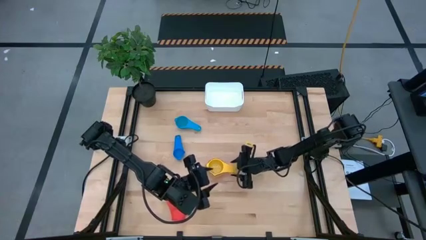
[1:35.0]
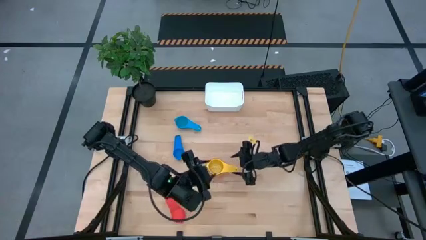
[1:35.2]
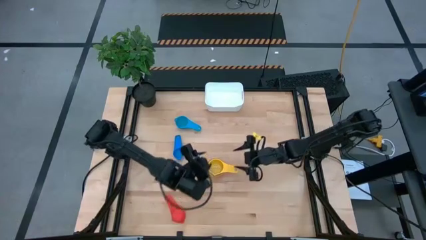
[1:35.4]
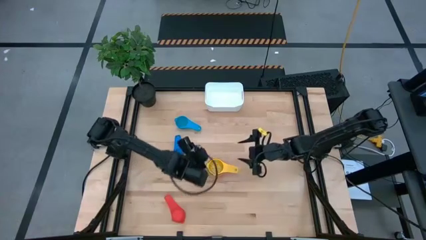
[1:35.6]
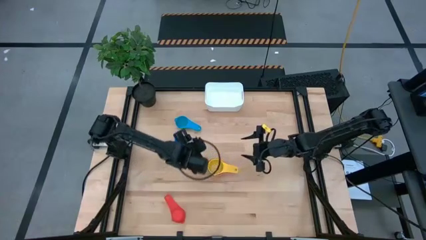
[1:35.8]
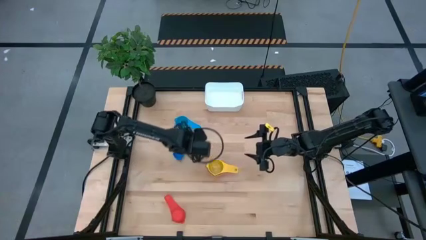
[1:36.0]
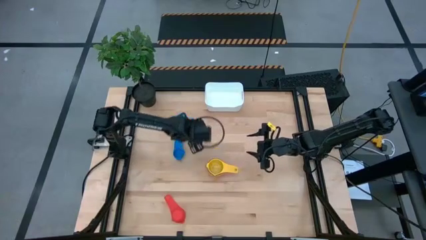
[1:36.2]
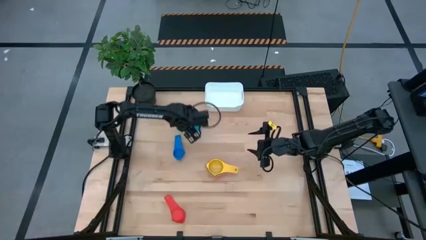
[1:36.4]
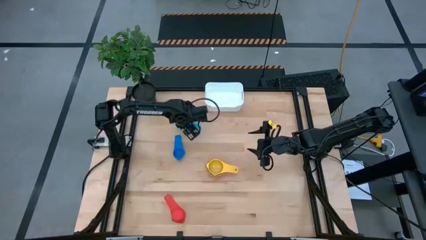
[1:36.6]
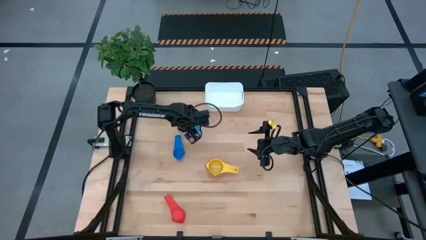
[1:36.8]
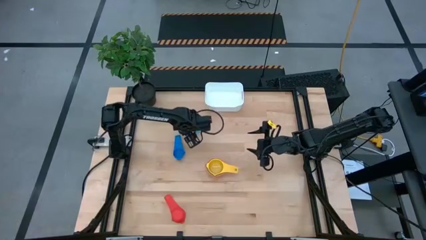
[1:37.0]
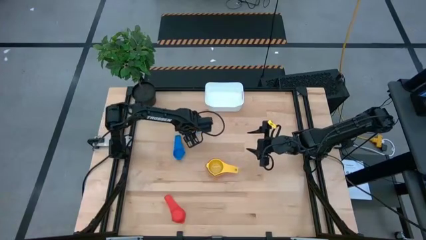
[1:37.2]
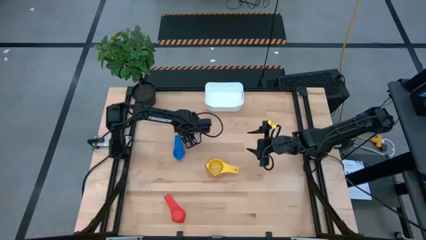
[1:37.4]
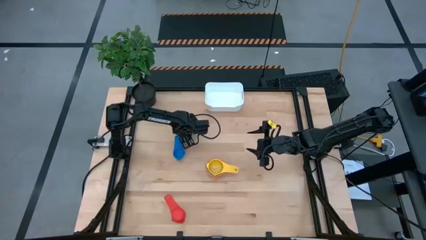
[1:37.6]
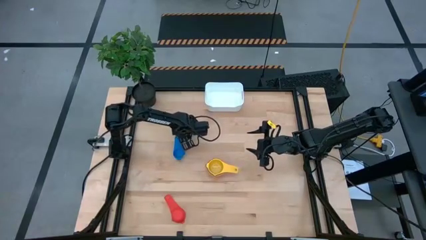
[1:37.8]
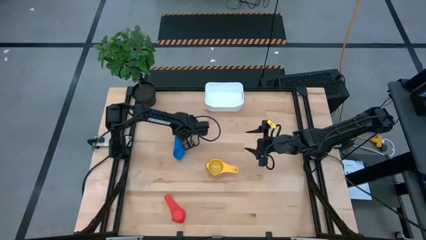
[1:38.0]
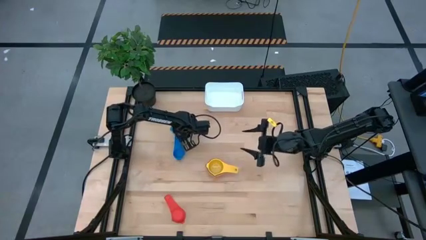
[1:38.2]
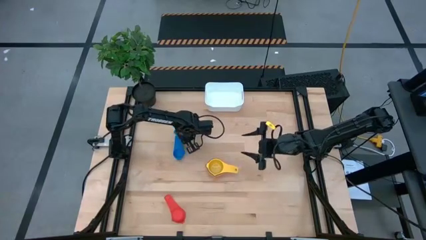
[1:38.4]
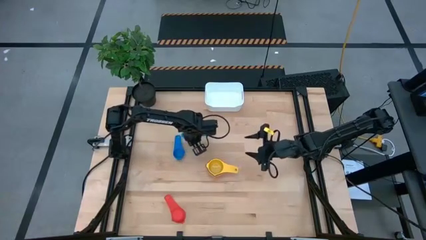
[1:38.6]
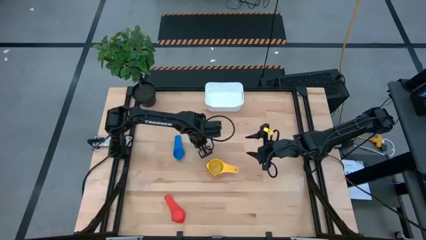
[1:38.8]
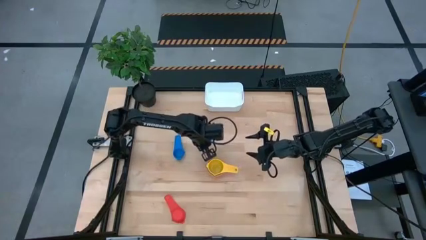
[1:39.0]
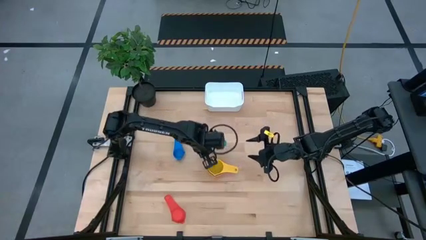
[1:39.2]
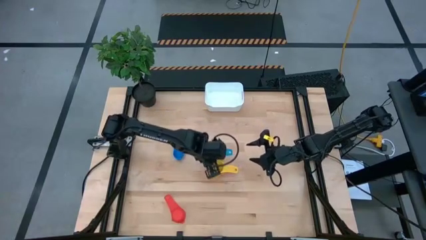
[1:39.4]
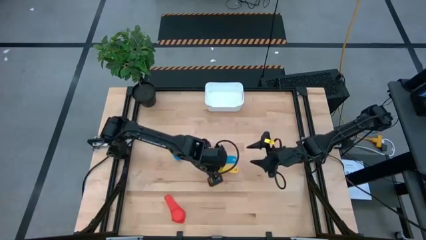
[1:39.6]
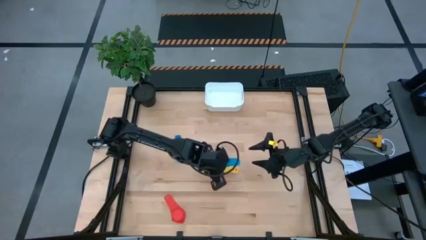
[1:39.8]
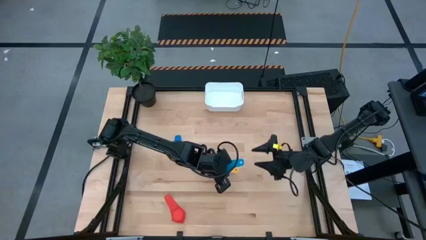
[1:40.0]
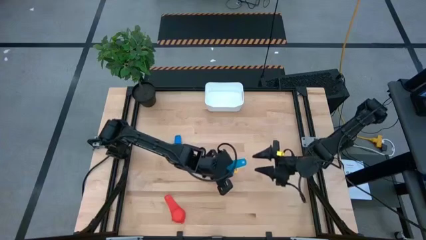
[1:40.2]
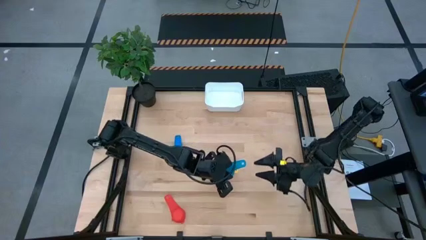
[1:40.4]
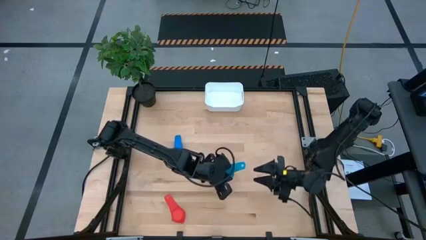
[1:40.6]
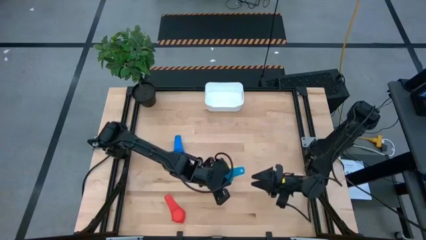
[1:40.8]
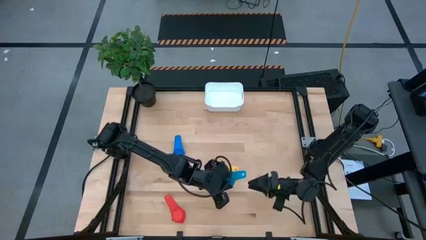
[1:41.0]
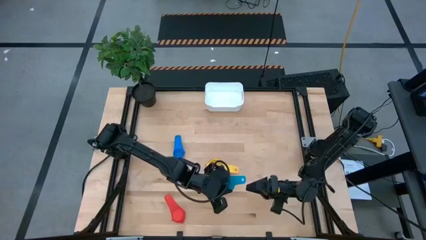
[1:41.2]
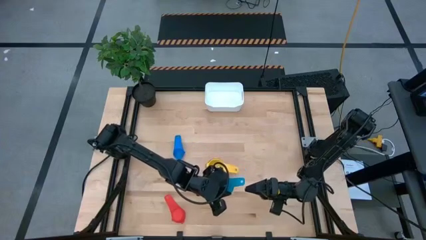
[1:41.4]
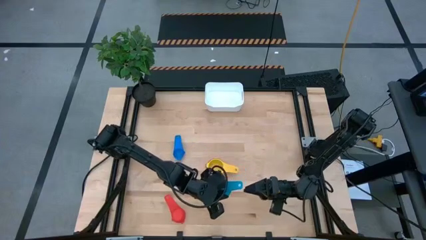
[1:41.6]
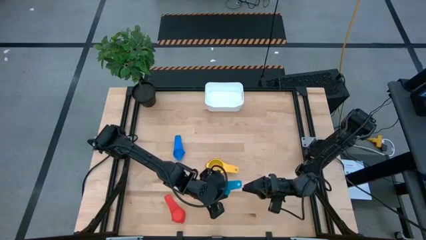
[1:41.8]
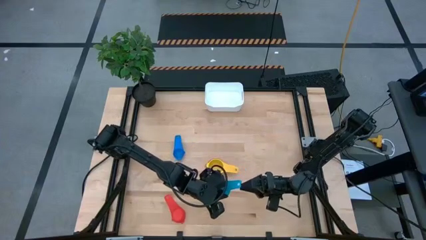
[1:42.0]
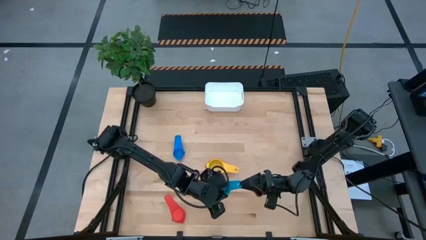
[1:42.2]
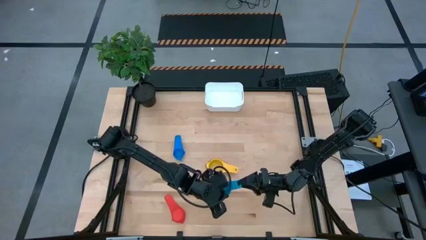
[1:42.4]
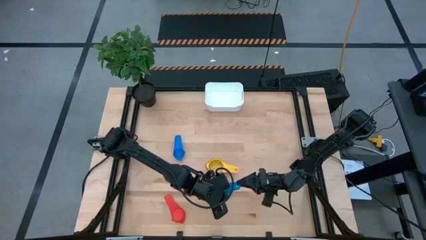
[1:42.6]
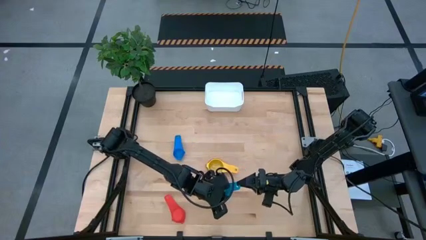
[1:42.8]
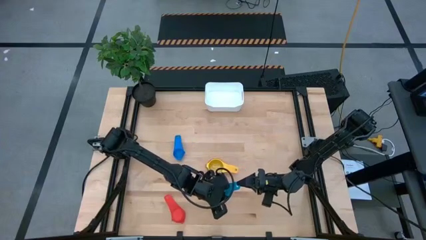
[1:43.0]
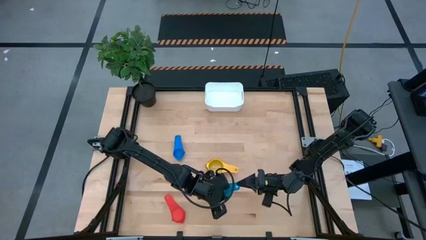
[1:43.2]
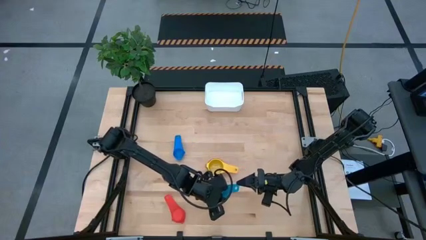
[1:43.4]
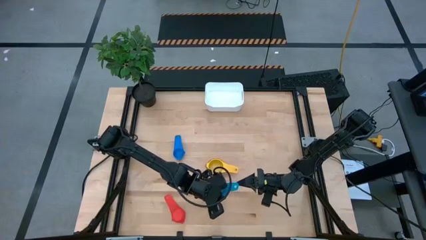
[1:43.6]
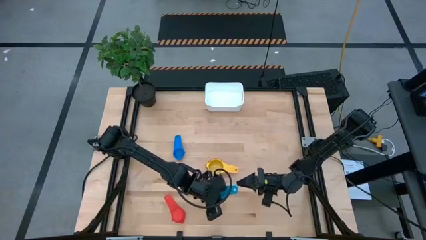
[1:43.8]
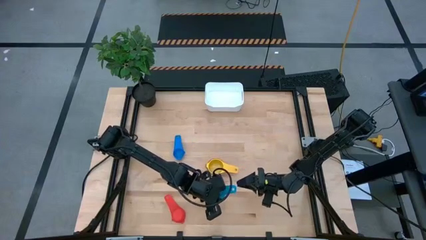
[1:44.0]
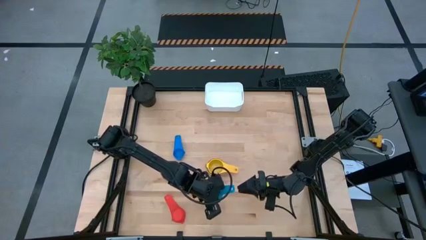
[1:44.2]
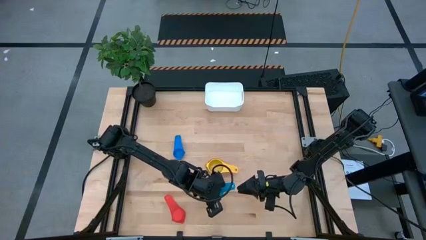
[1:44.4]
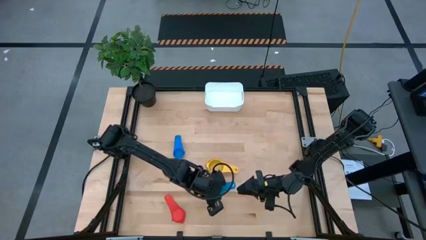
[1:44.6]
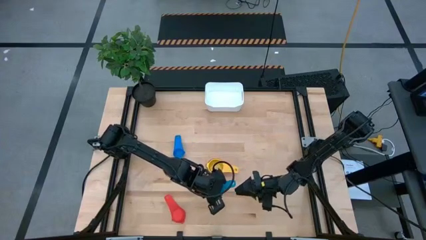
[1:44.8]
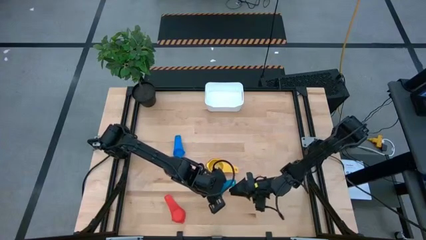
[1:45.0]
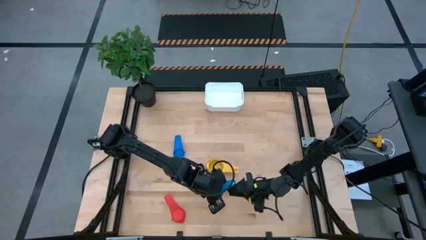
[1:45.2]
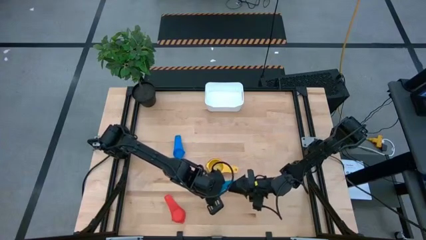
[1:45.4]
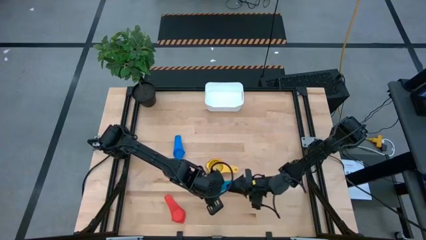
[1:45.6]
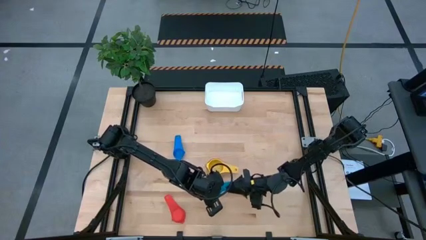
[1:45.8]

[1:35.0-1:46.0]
Task: Nest measuring cups in basket
Stack the light blue measuring cup on top of the yellow measuring cup

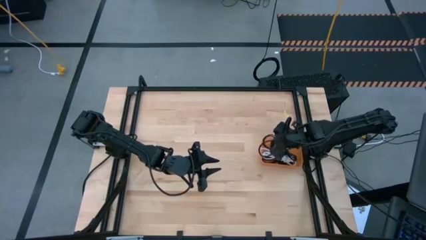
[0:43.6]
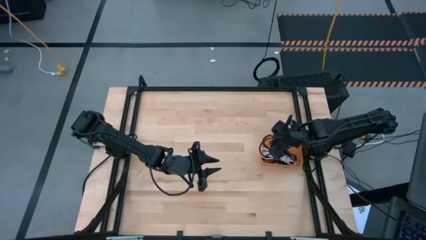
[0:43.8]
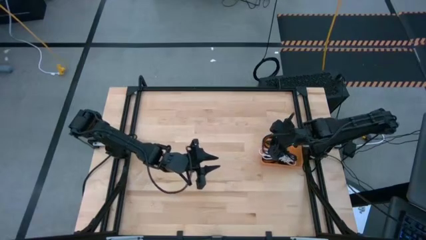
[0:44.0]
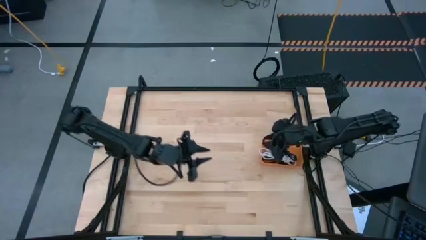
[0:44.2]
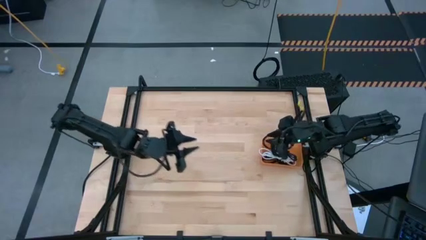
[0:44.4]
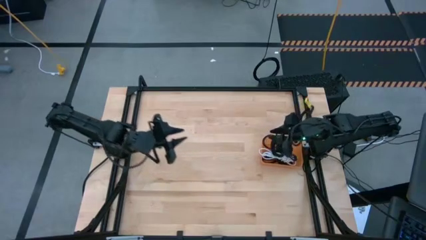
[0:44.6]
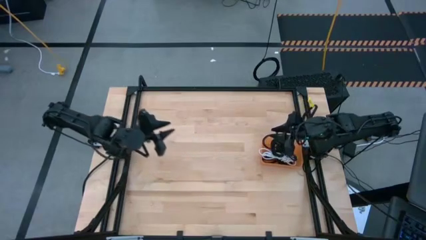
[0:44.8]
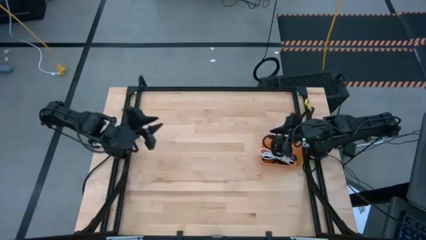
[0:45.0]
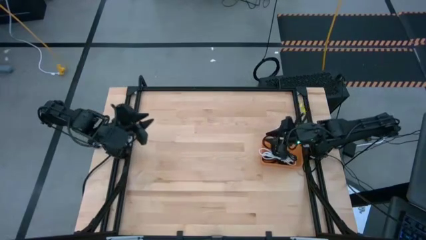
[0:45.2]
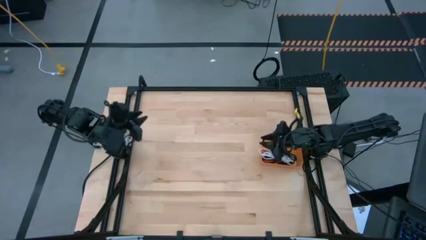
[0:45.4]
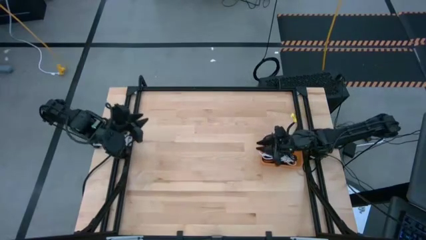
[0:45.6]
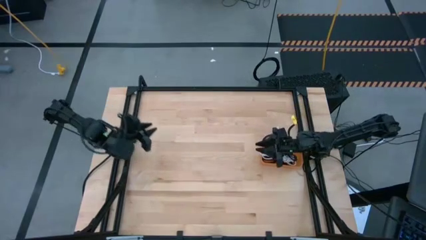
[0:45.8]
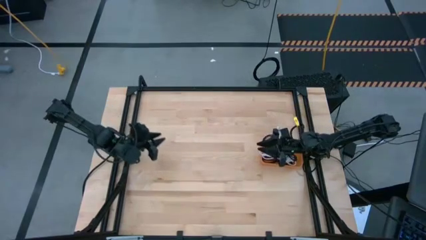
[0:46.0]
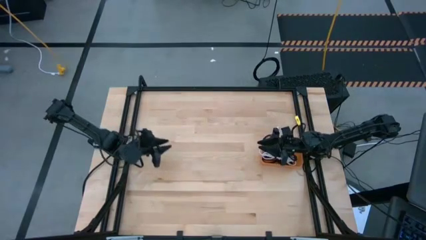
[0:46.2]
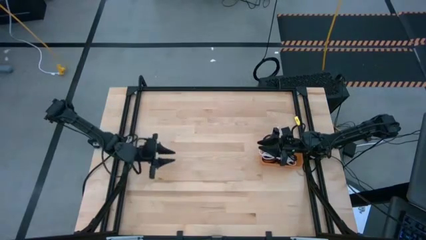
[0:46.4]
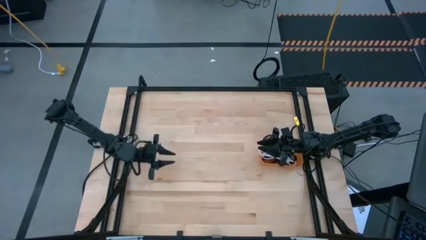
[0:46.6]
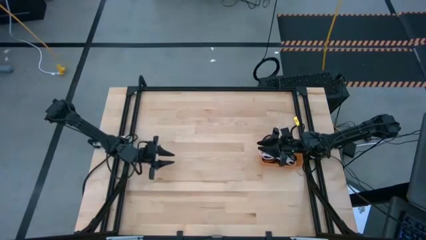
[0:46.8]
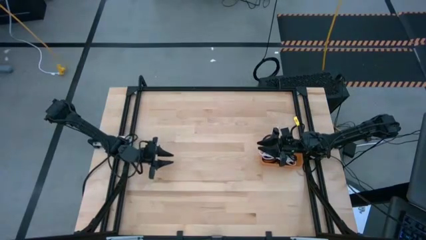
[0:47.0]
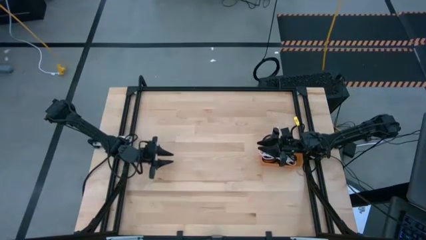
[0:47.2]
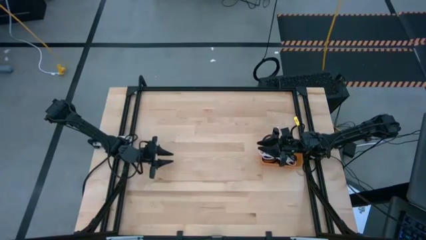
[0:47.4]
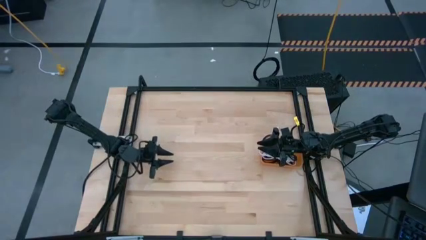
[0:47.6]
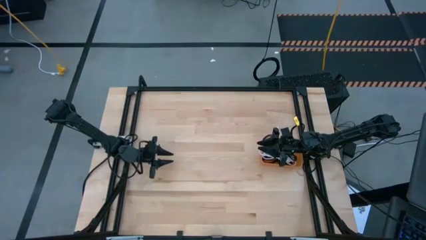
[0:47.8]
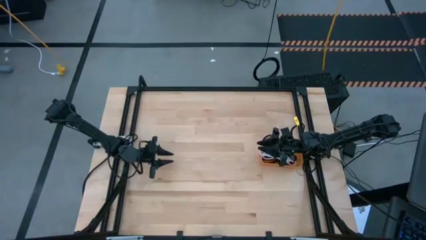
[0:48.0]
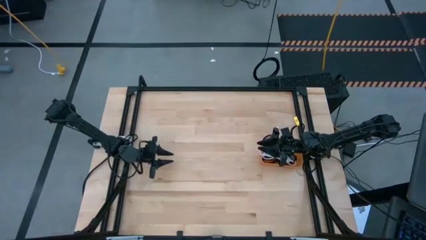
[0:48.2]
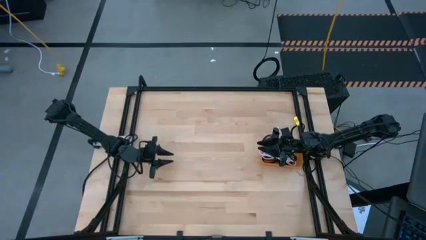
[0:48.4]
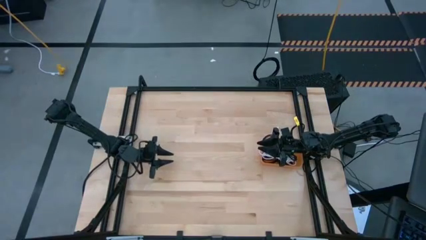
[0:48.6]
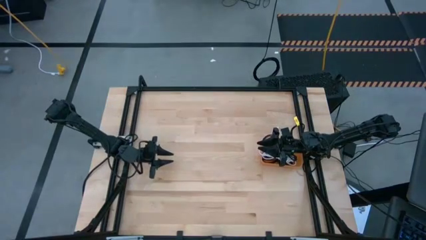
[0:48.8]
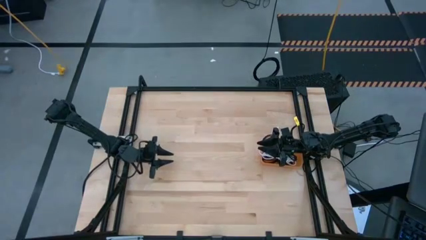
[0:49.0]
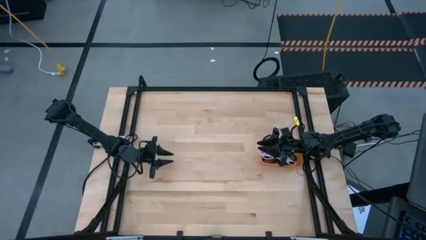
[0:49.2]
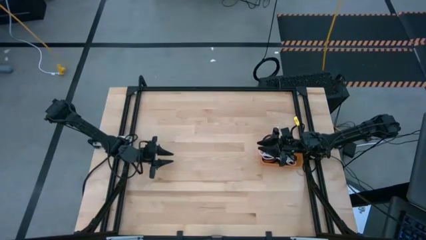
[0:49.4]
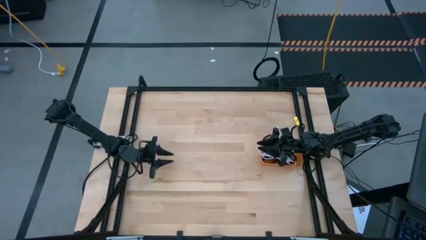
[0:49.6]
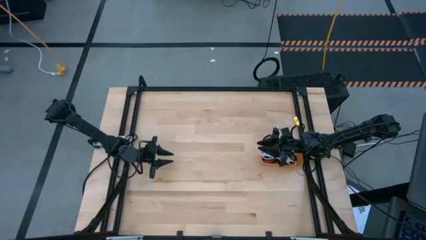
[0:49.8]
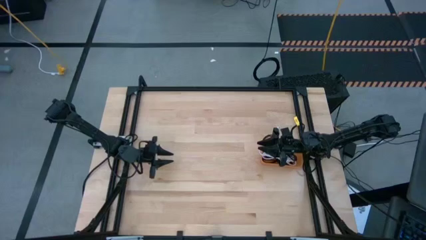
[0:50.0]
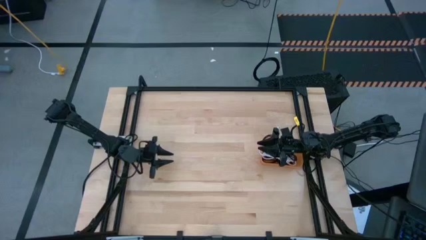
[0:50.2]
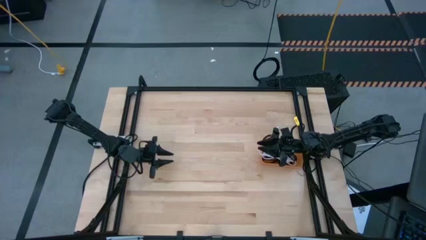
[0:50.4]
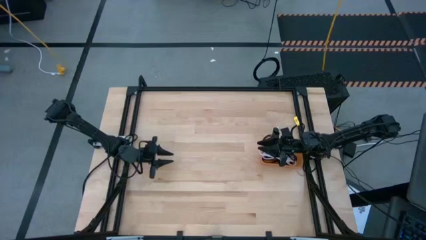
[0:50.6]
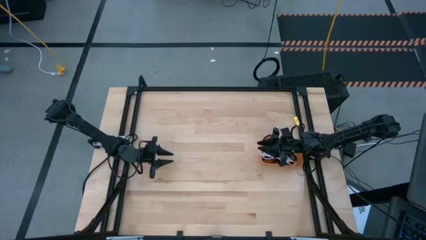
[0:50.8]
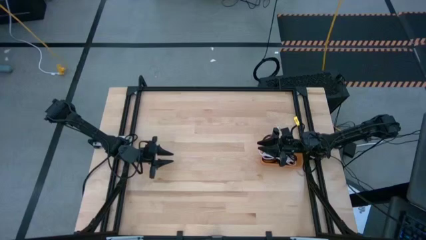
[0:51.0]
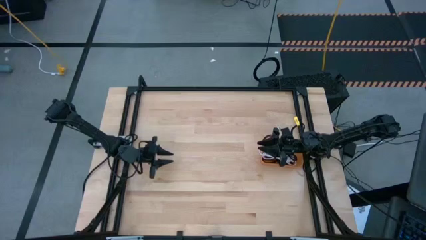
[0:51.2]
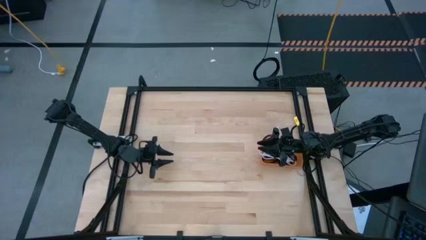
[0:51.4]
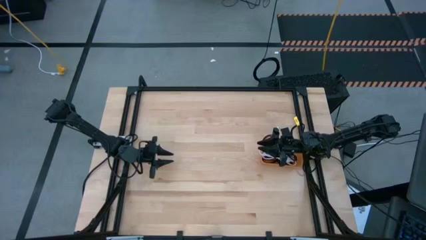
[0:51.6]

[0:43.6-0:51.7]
Task: Pick and place USB-C Cables
Return to Home Position
